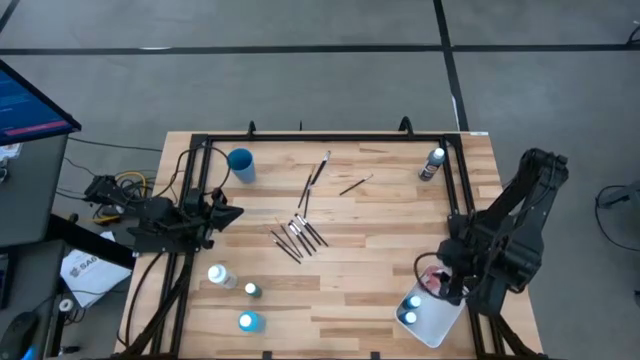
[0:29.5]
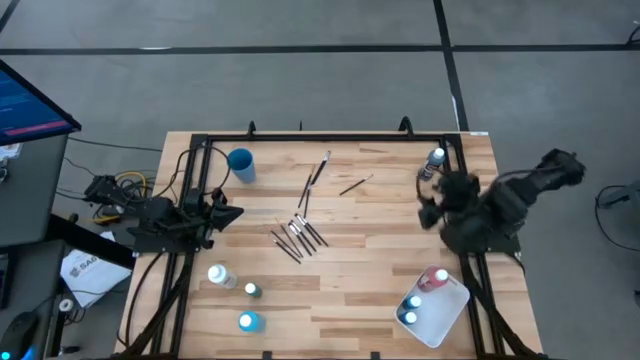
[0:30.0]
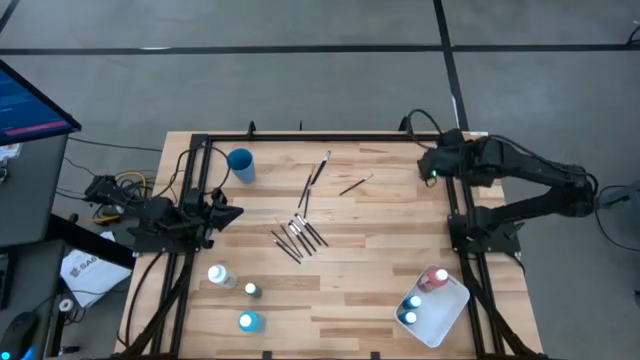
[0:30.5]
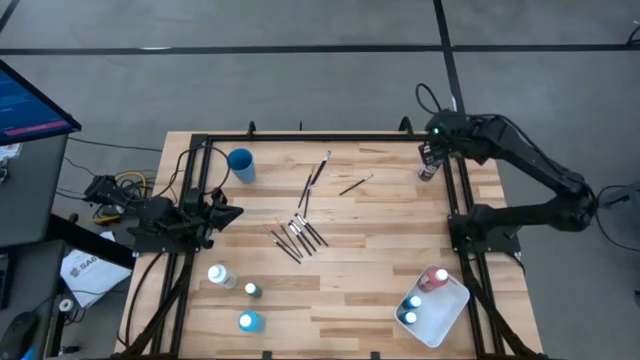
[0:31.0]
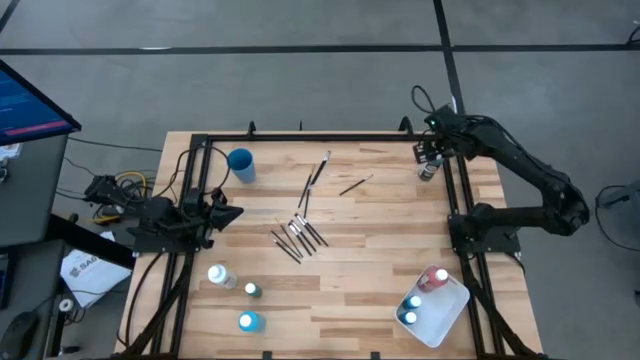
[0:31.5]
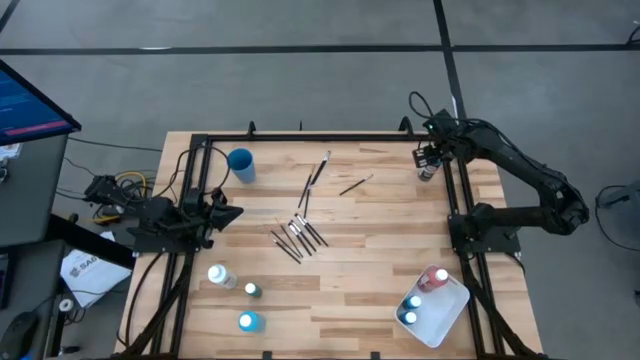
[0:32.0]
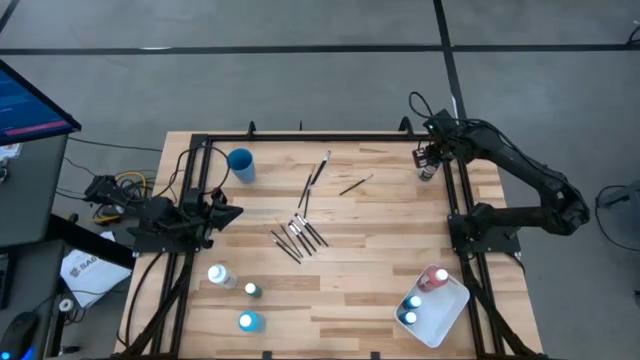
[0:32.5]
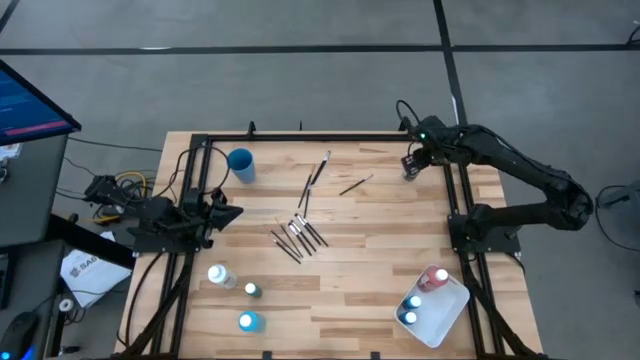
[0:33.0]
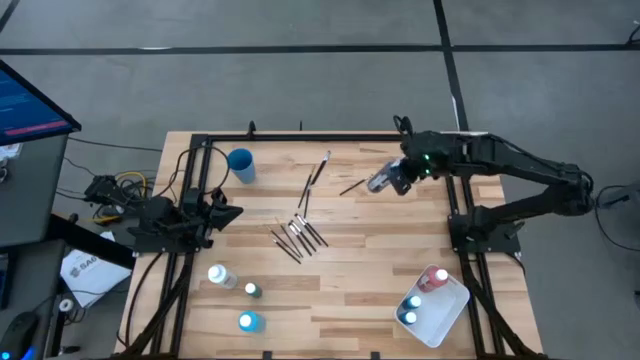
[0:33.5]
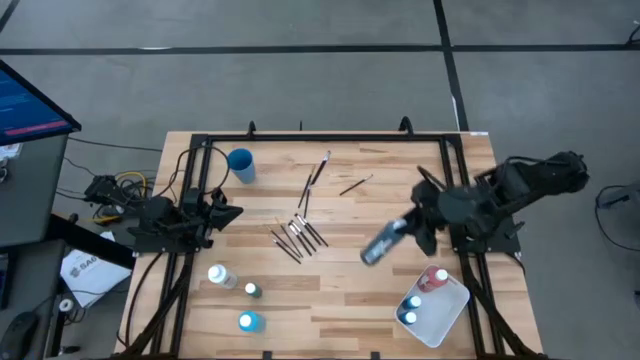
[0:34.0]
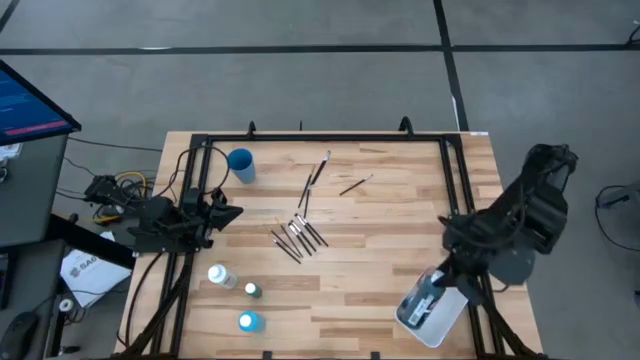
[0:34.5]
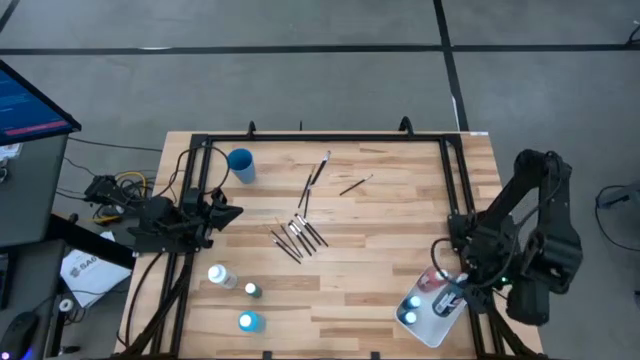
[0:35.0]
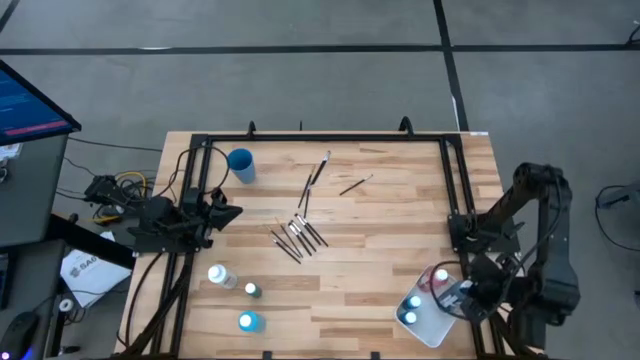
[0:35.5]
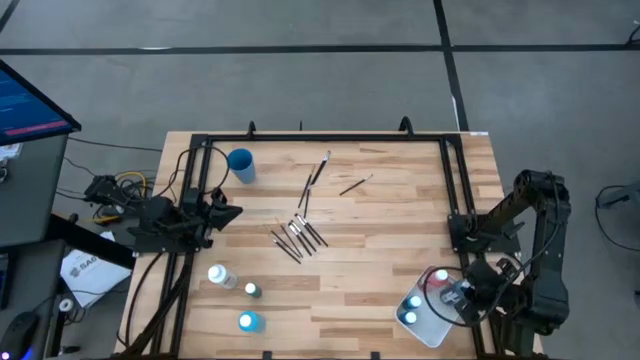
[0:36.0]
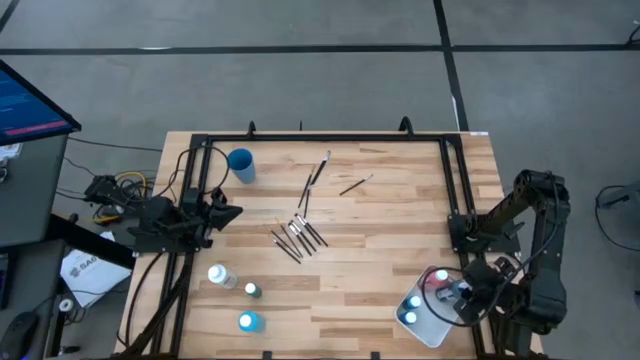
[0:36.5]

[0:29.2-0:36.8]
Task: Pick & Place Paint Supplies
Put the large green paint bottle into the white bin

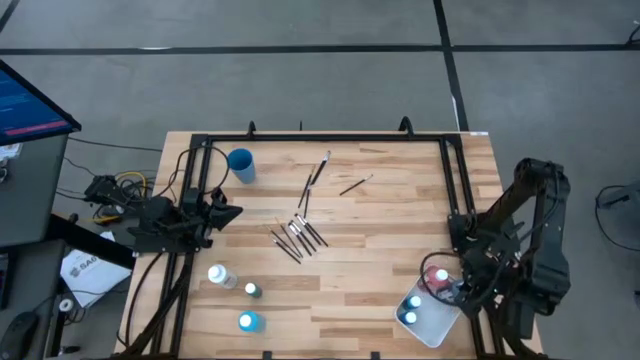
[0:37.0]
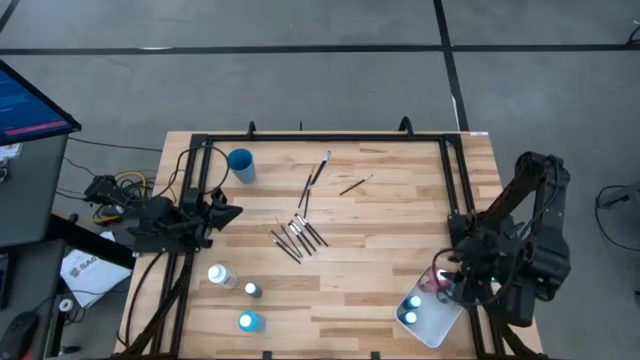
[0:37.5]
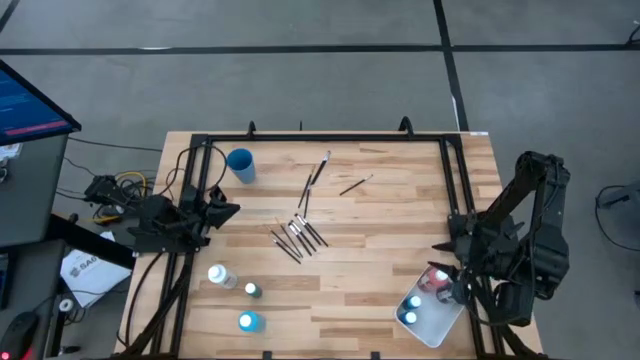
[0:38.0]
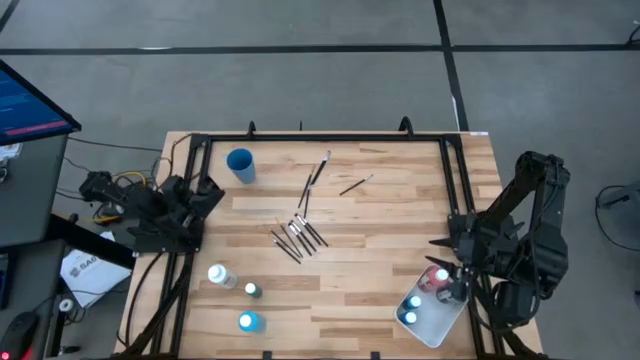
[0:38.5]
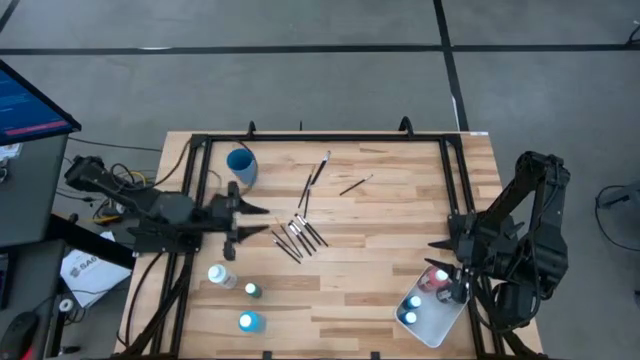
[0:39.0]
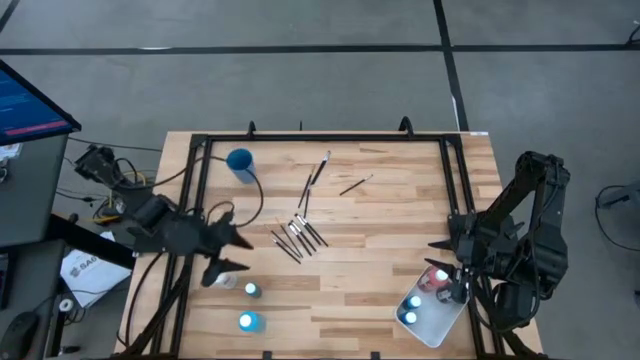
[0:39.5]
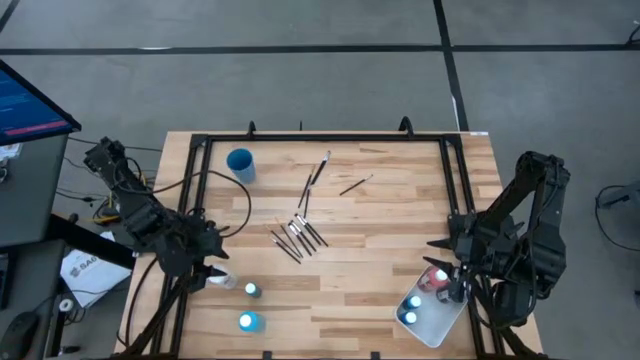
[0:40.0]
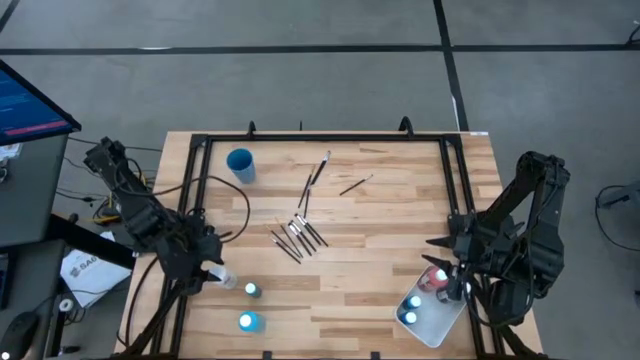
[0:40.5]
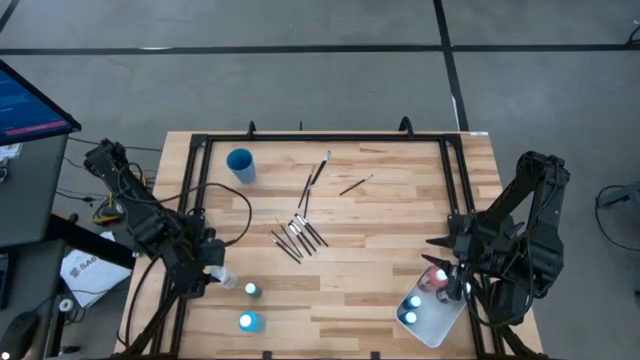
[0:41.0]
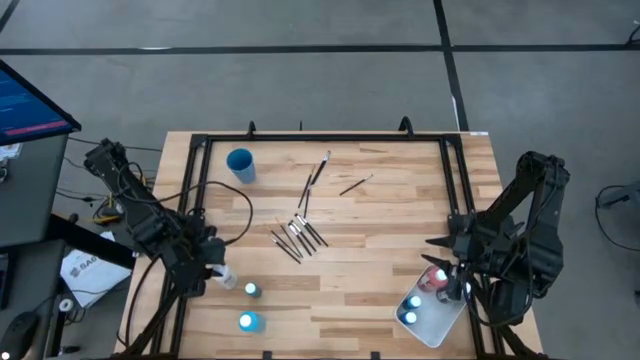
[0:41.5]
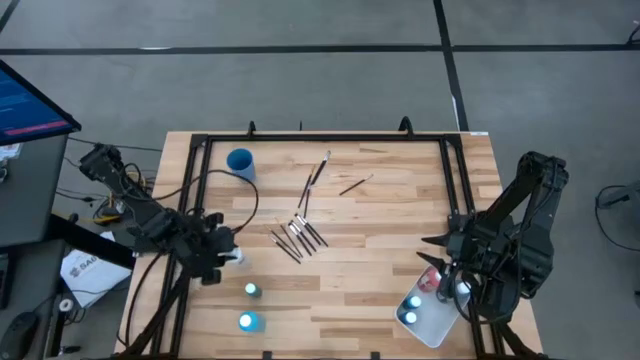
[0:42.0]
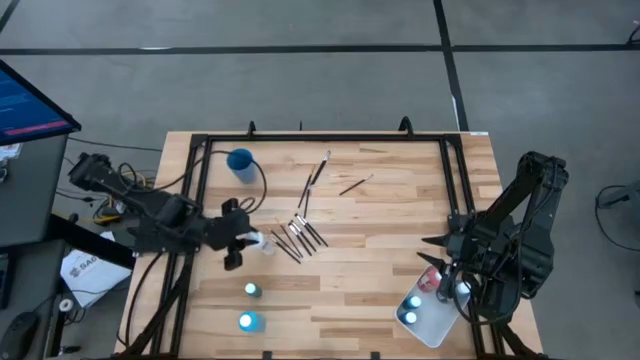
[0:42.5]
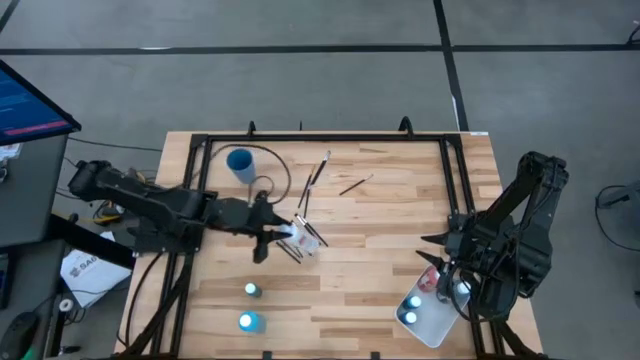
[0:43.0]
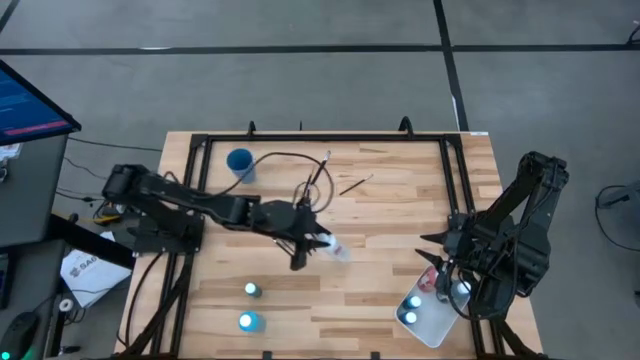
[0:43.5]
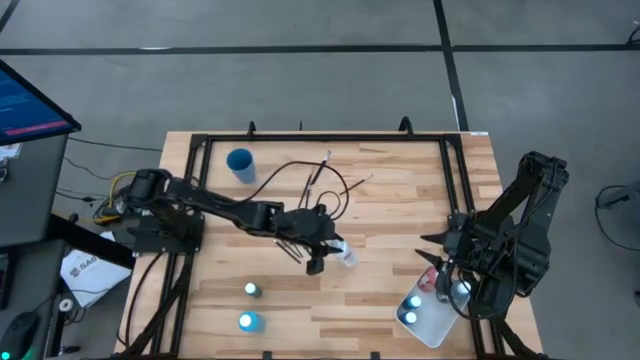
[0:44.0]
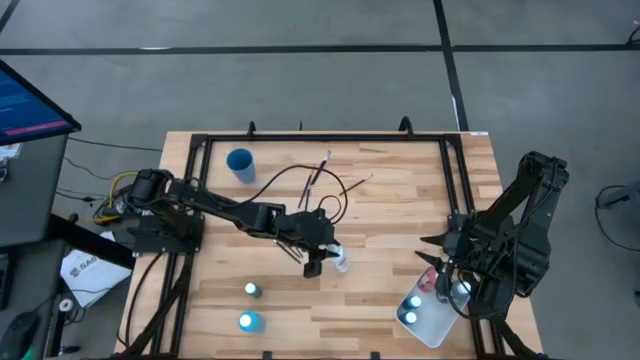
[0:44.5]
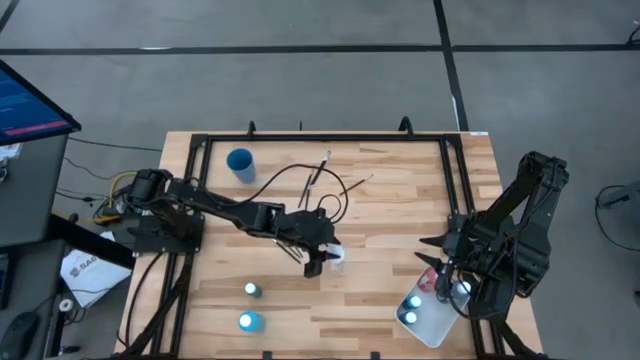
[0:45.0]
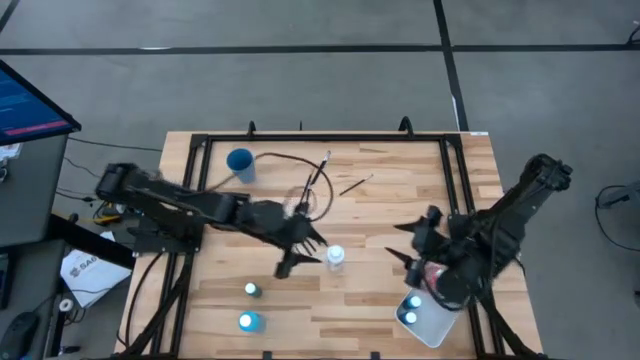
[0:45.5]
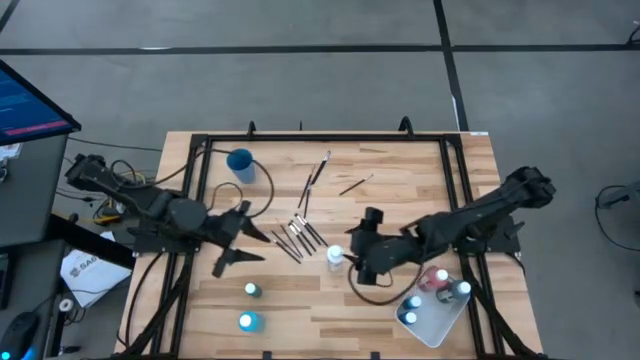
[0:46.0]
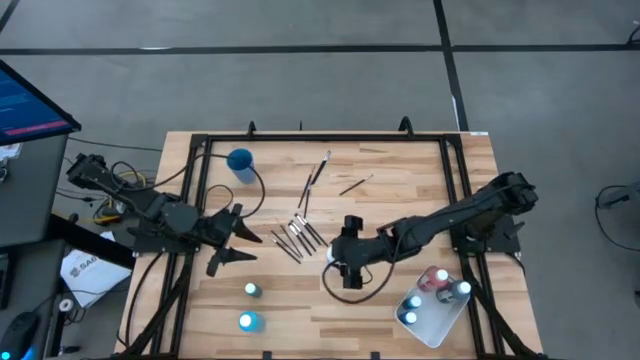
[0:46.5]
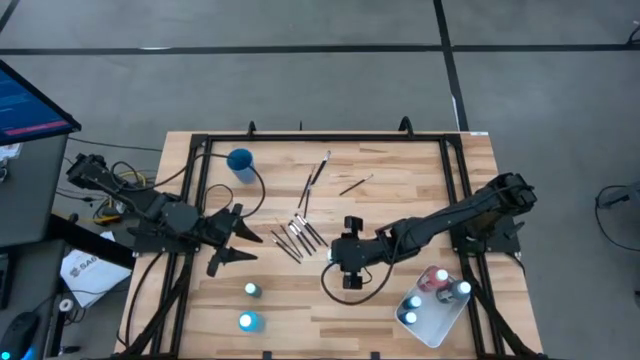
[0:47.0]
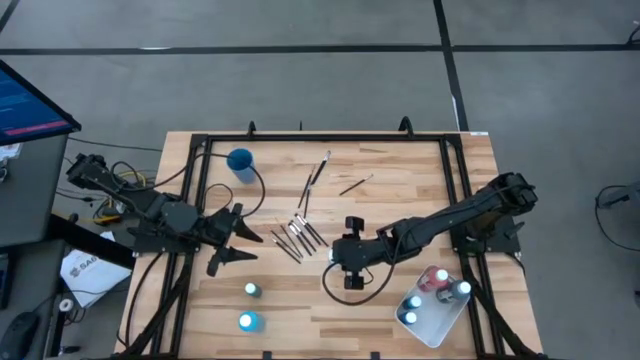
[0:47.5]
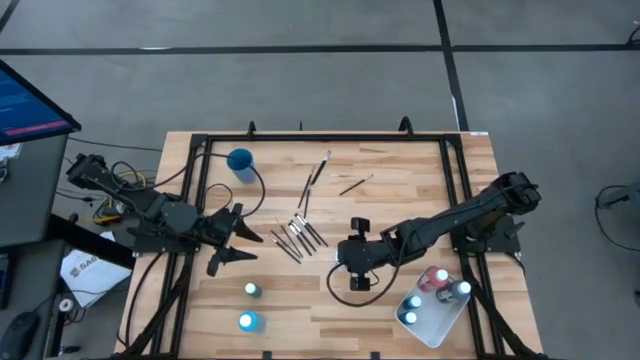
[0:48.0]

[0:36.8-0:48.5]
Put the large white paint bottle into the white bin

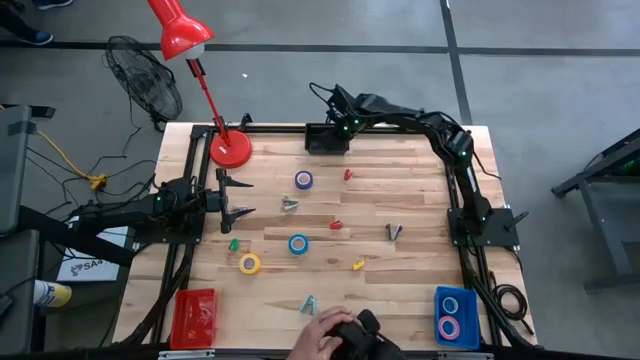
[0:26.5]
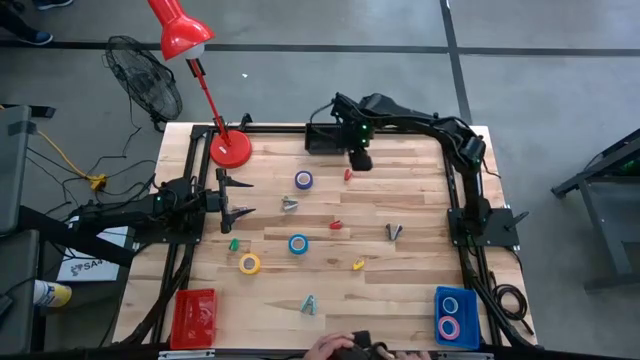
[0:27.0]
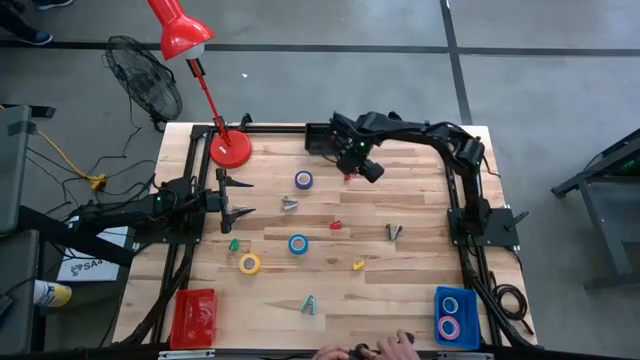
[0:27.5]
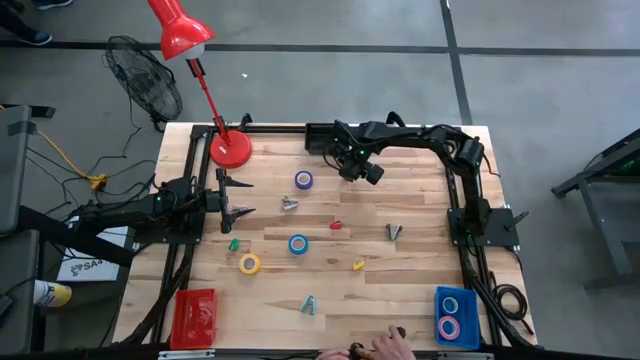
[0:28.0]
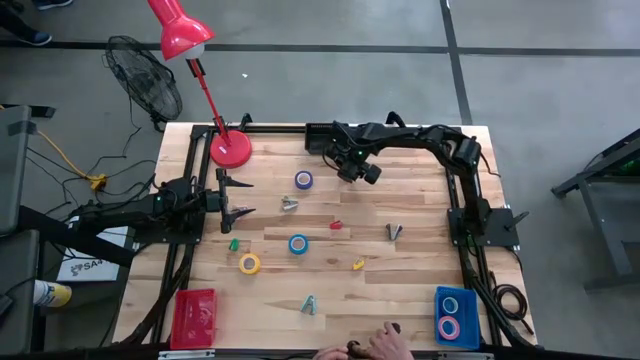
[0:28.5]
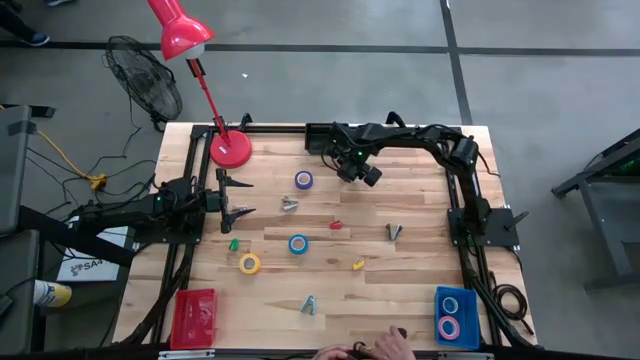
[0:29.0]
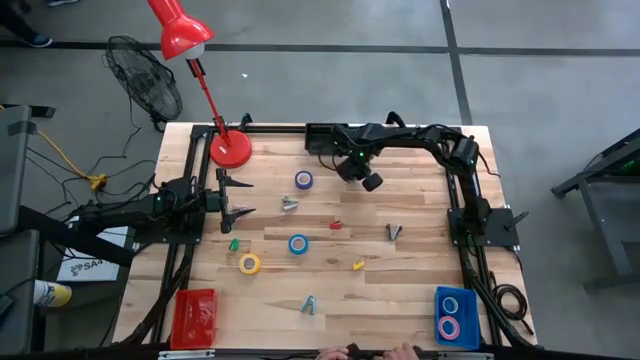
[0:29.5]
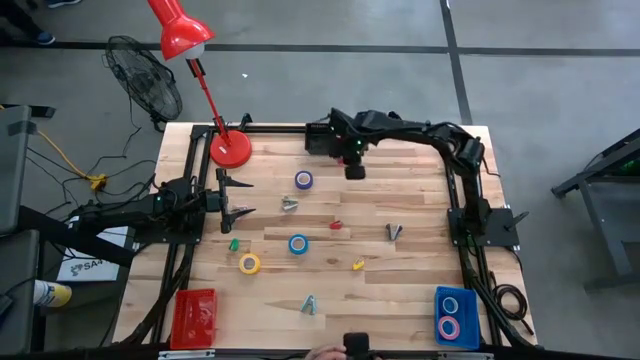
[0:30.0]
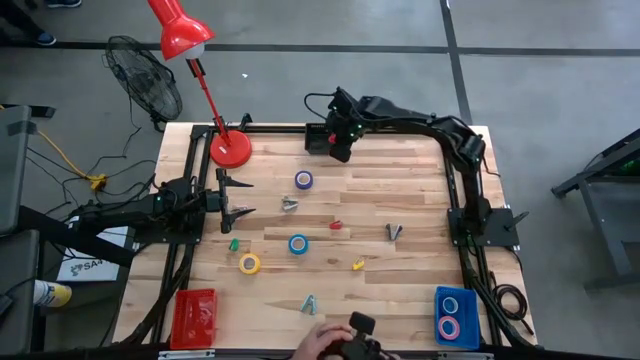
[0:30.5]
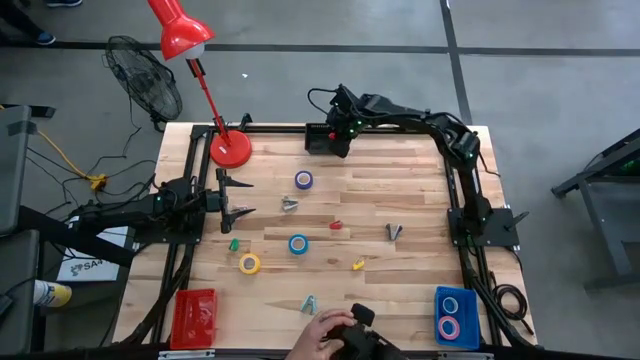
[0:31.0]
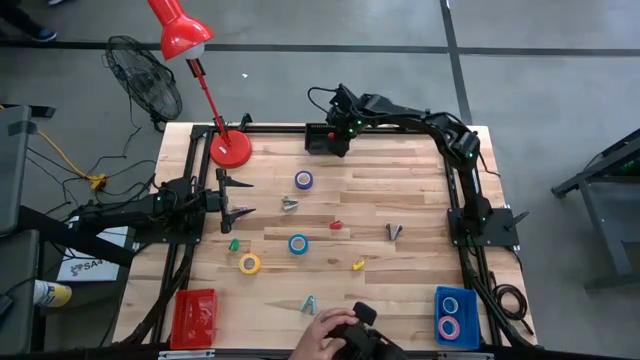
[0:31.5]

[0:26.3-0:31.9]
Task: Pick and place Stapler, Stapler remover, tape
Put the top red stapler into the black basket
